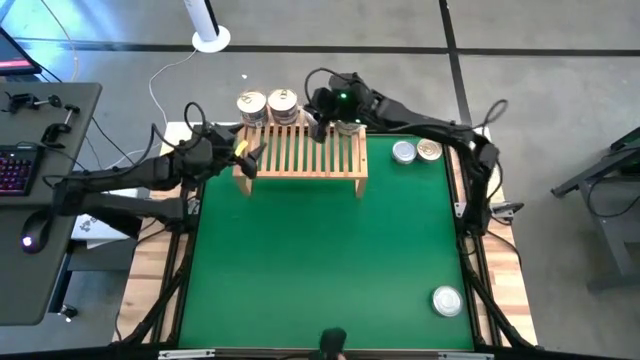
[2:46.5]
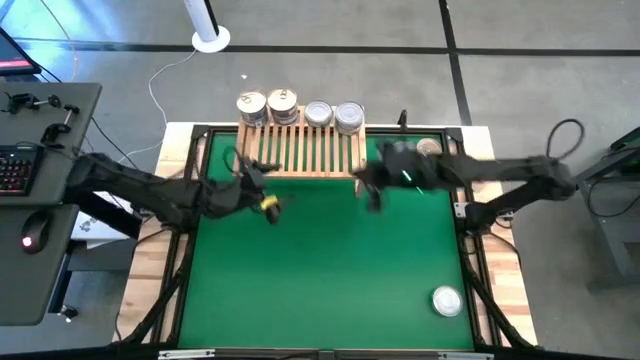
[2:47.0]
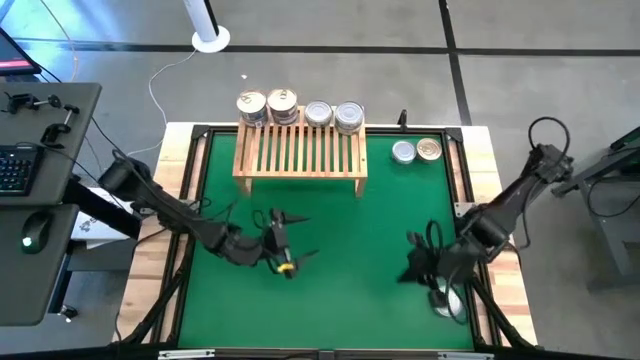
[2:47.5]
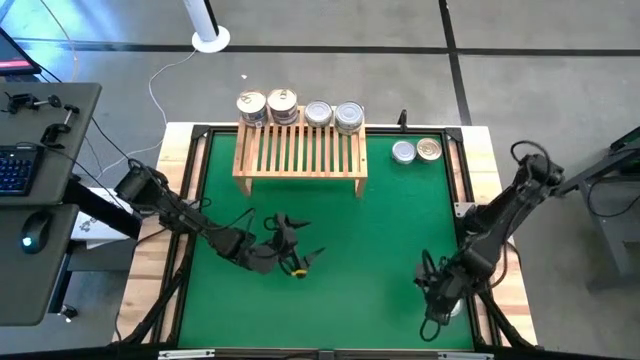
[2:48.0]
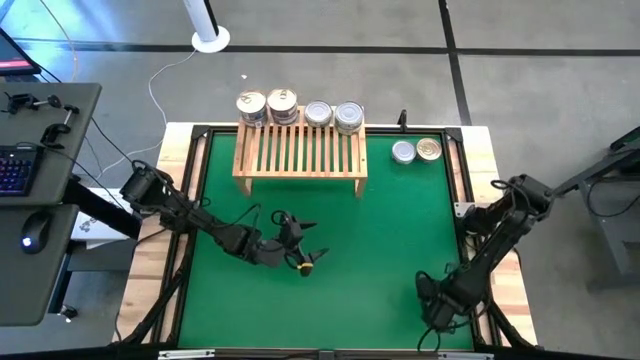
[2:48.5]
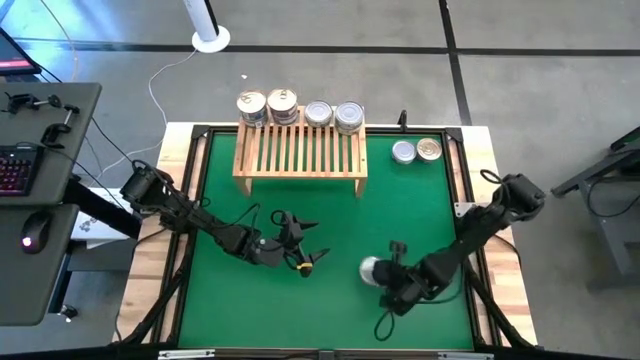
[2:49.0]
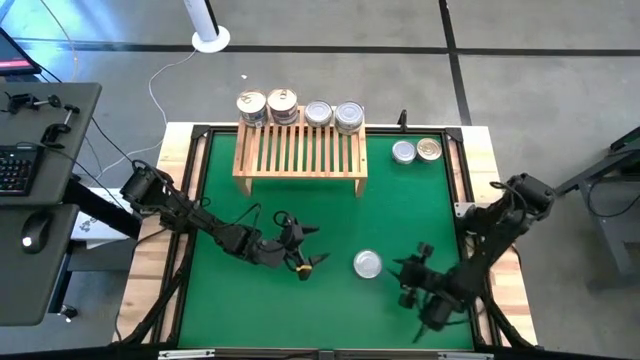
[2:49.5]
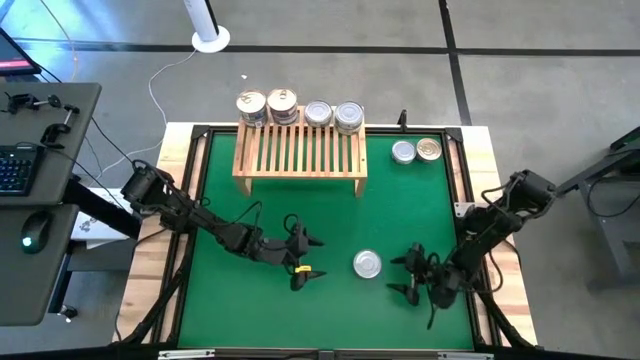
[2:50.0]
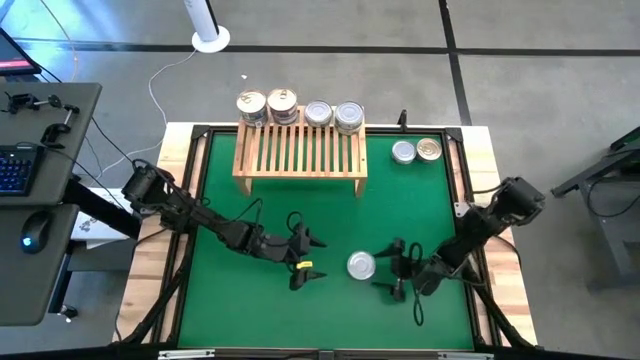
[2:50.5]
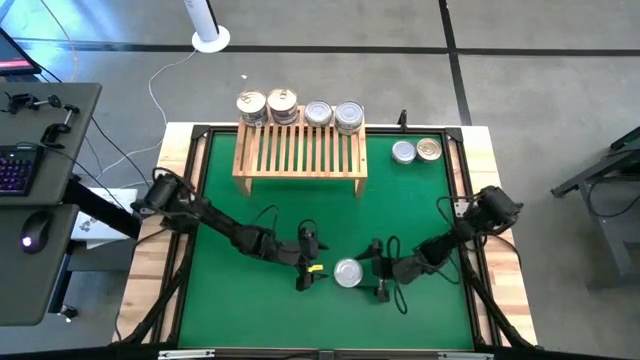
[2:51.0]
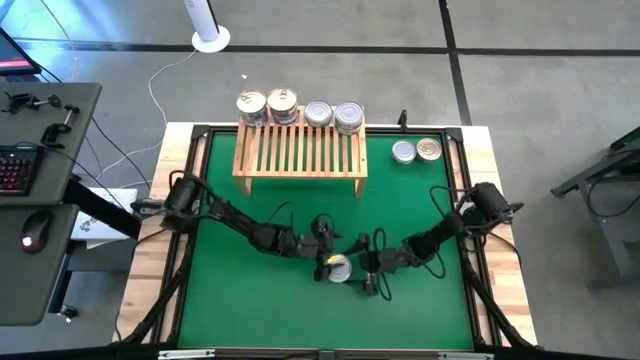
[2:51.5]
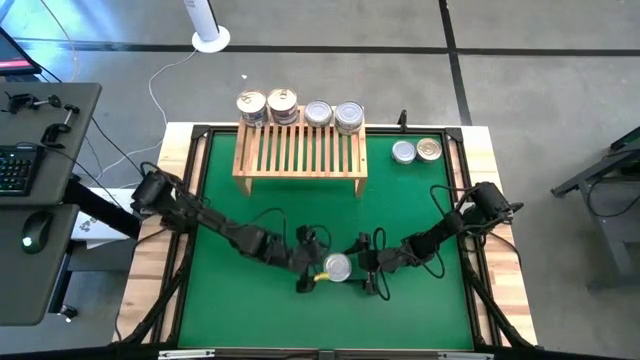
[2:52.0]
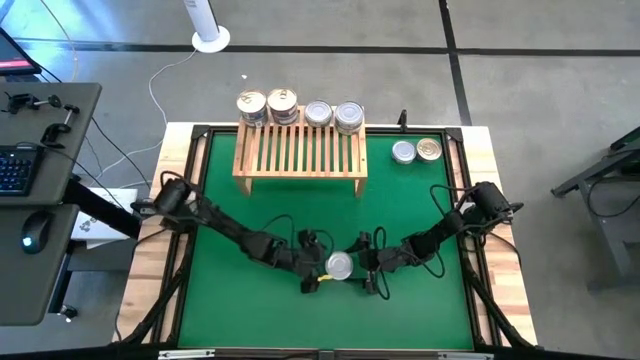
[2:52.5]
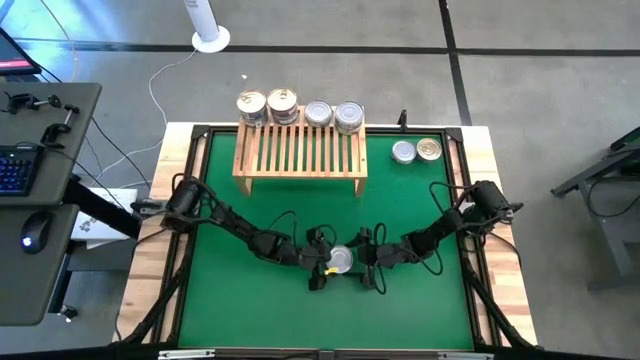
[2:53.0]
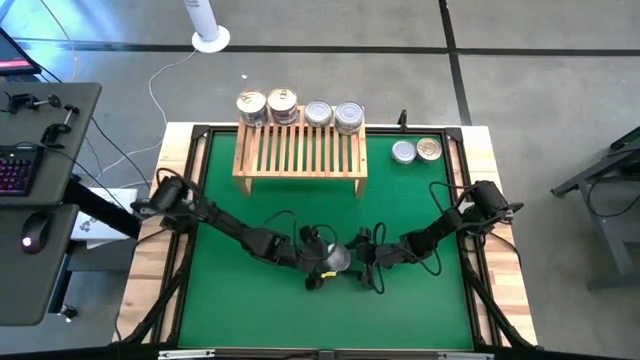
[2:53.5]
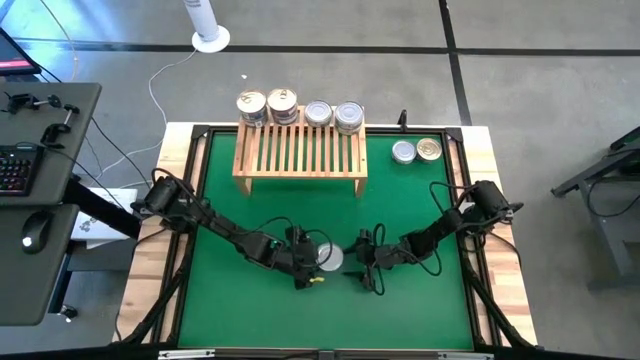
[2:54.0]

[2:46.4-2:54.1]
Task: Stack canned seafood by type on shelf
Stack the green white tuna can on top of the left green white tuna can on the shelf

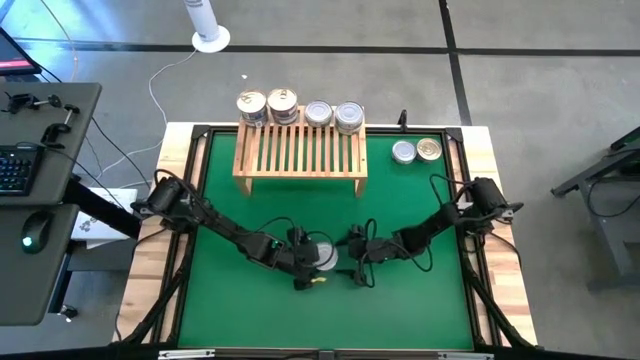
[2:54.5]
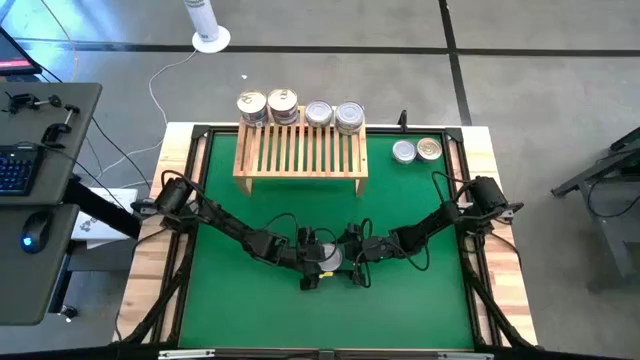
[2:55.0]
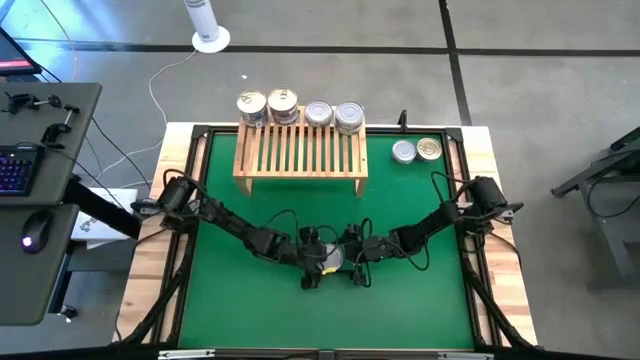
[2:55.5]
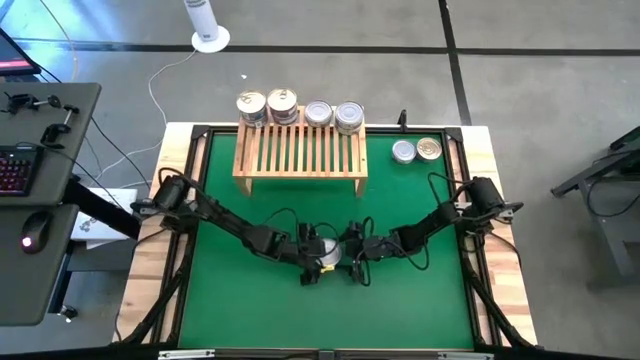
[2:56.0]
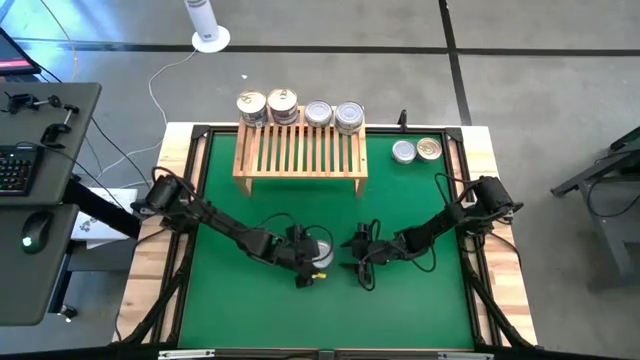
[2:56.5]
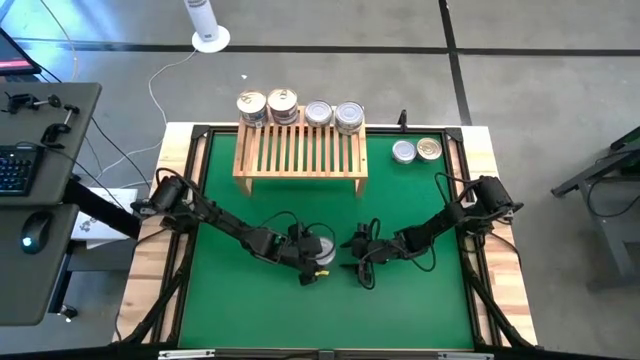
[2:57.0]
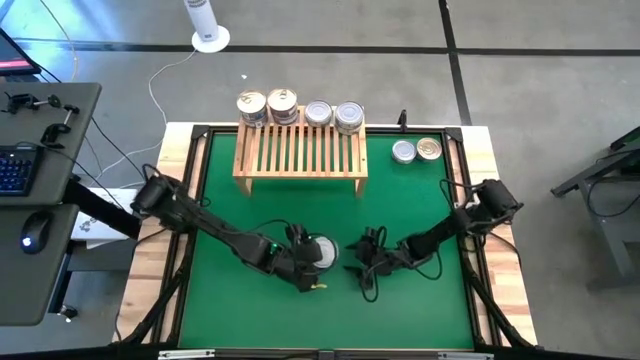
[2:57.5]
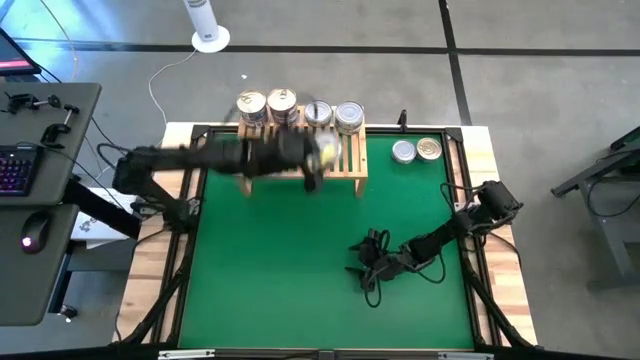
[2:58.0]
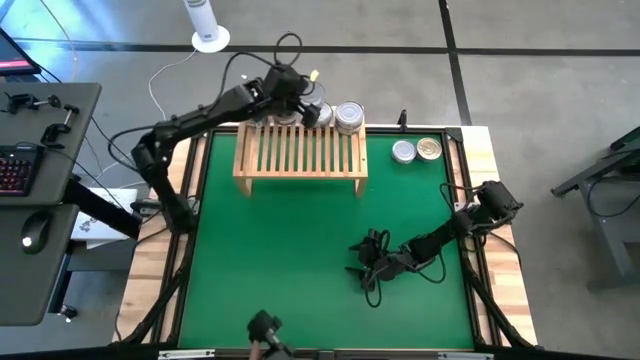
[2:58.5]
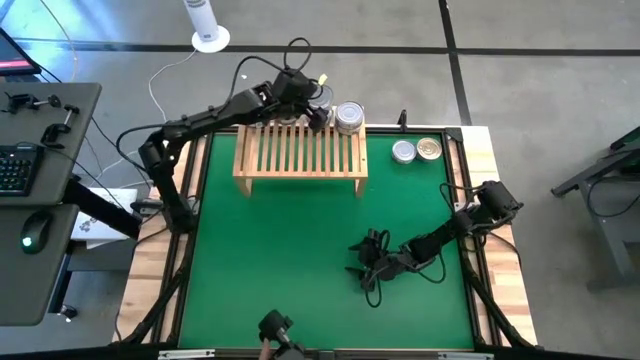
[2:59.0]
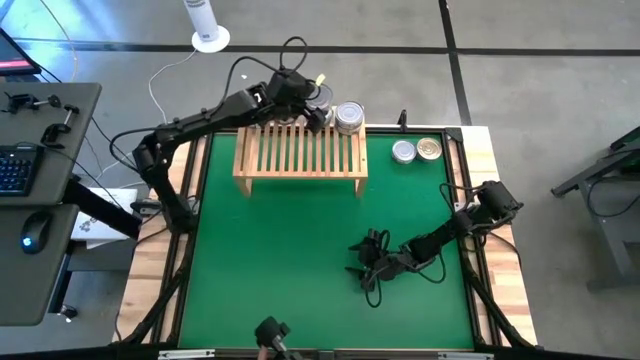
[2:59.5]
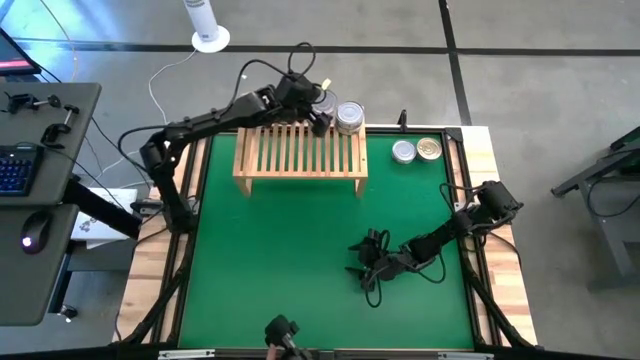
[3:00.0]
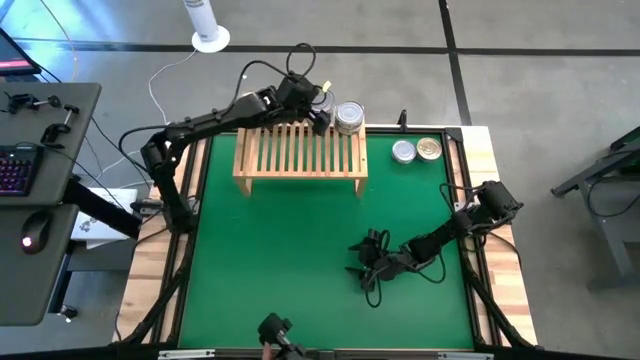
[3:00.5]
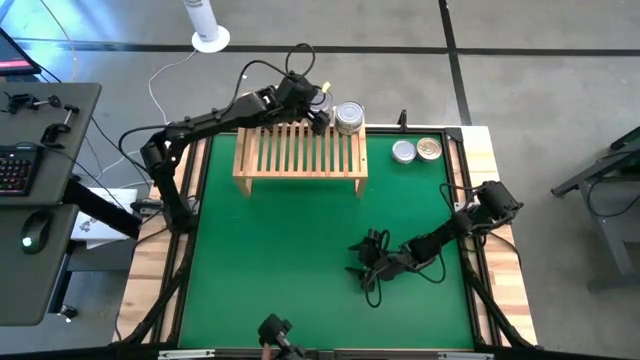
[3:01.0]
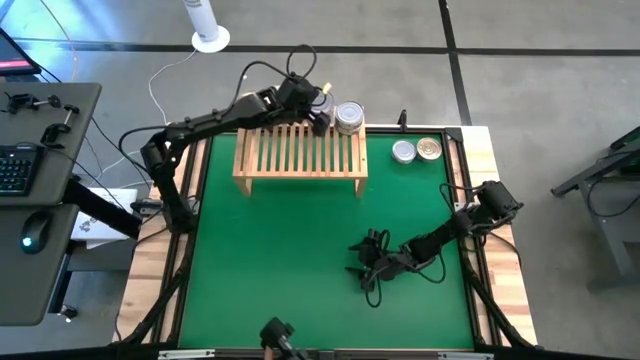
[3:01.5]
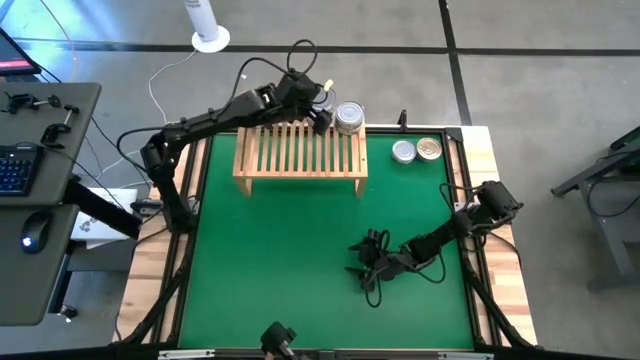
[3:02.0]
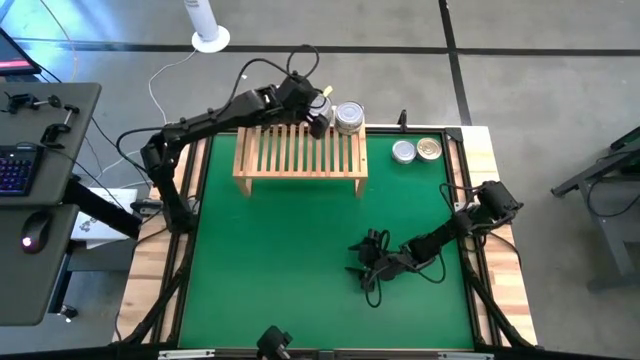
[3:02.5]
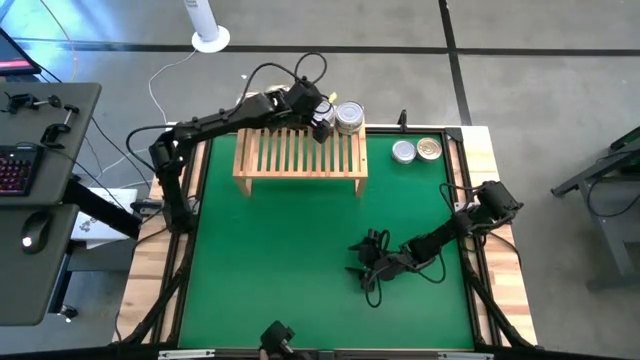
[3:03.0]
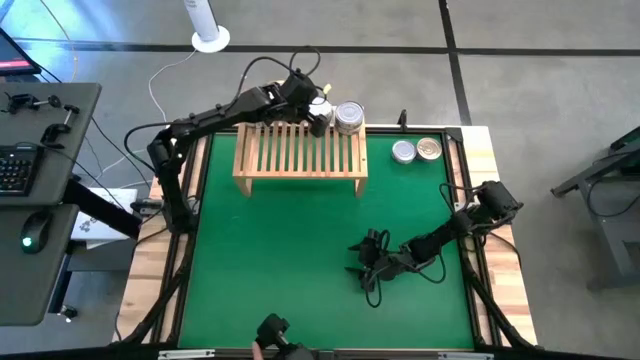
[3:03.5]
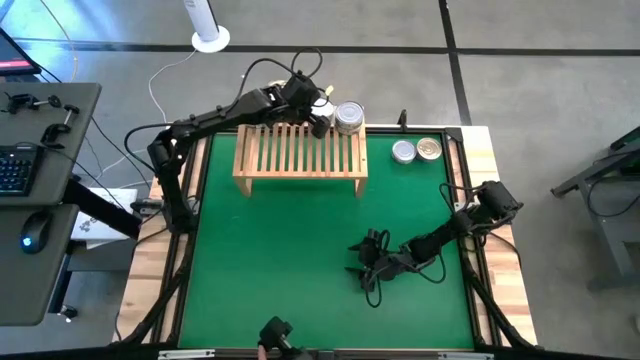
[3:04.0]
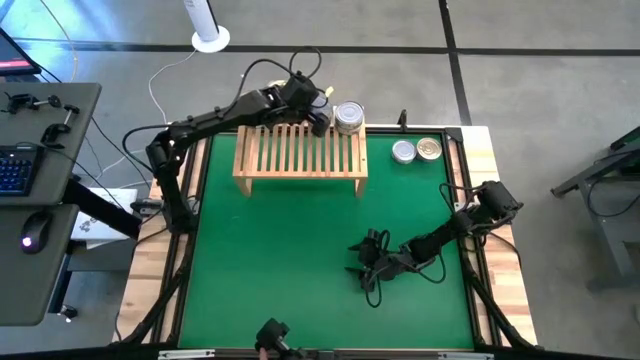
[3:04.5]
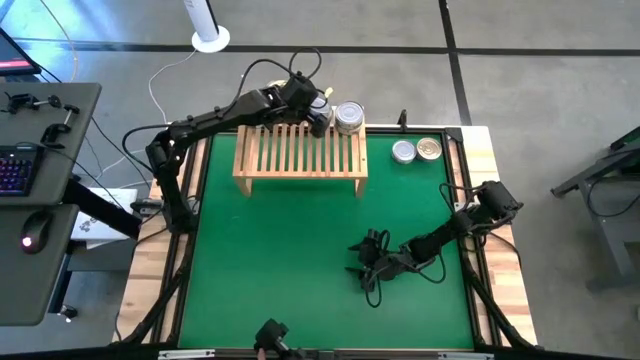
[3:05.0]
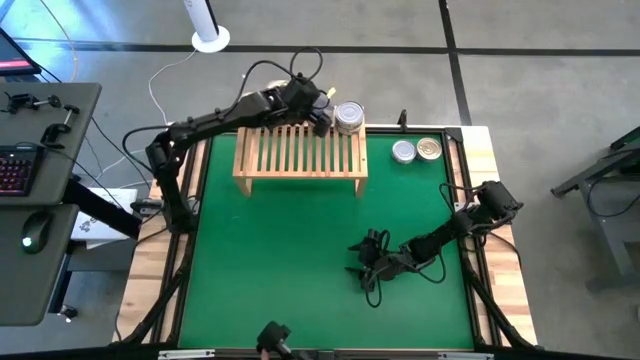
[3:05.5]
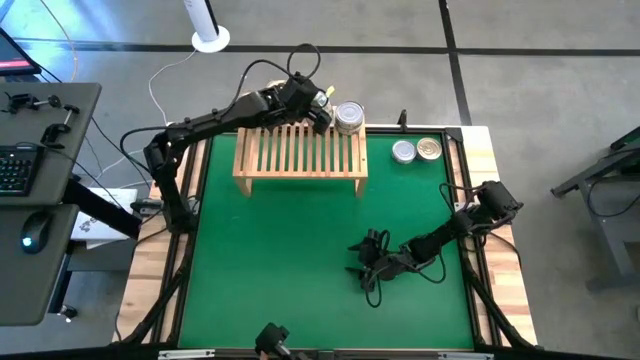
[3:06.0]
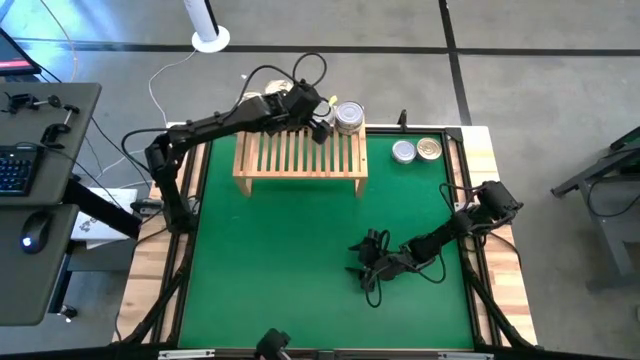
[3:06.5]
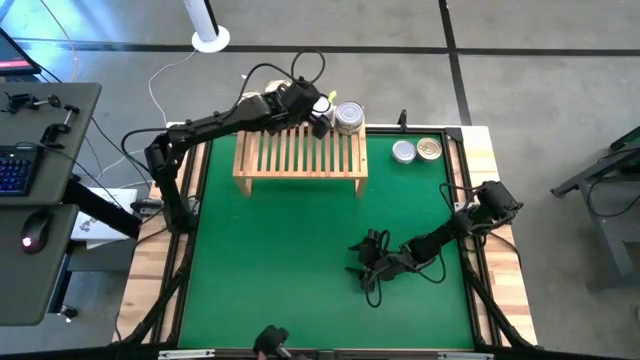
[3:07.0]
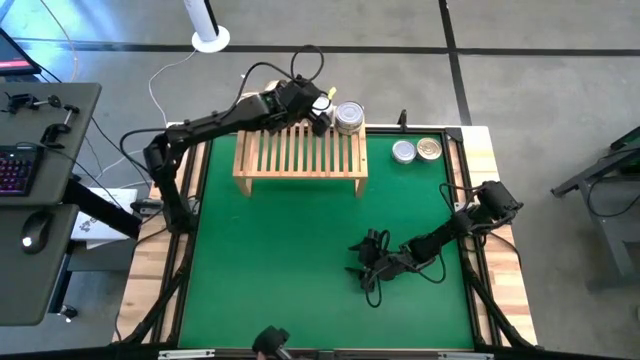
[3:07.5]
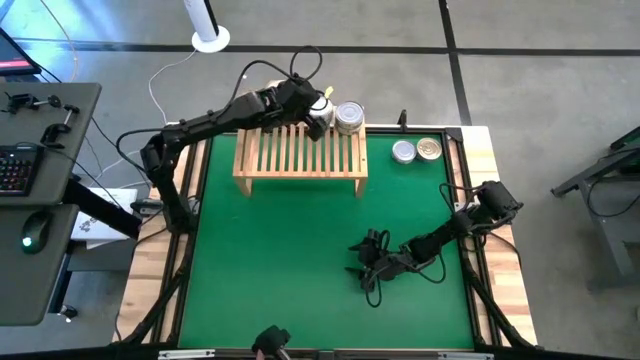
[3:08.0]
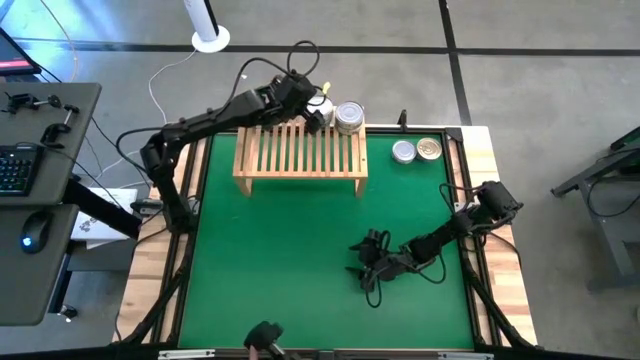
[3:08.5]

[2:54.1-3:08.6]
Stack the green white tuna can on top of the left green white tuna can on the shelf
